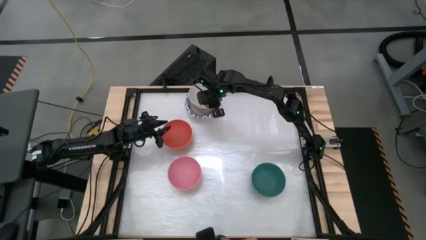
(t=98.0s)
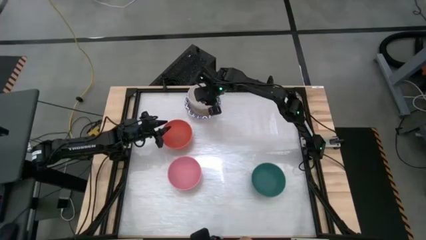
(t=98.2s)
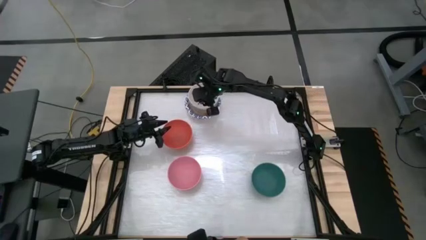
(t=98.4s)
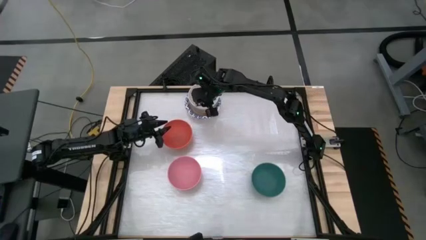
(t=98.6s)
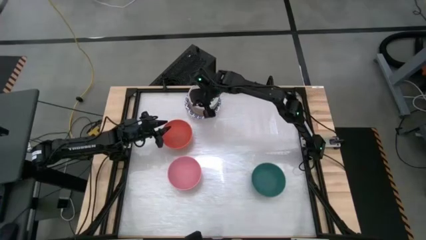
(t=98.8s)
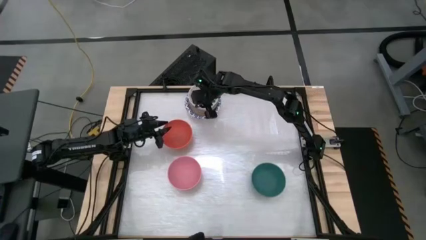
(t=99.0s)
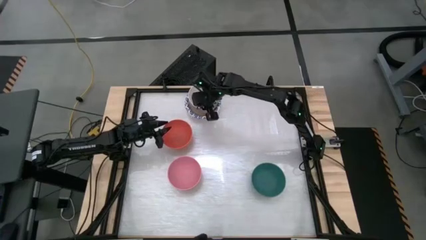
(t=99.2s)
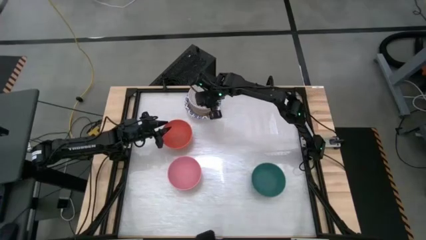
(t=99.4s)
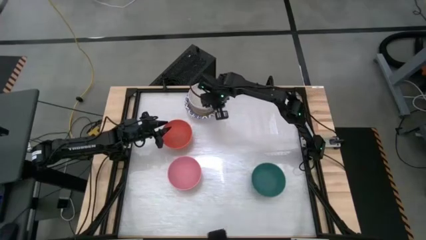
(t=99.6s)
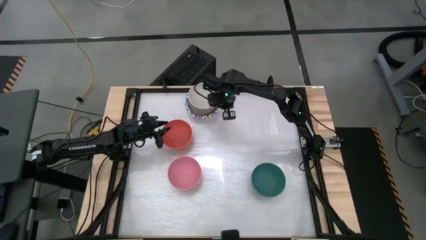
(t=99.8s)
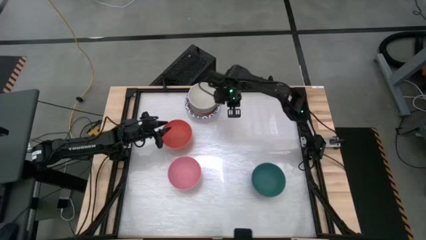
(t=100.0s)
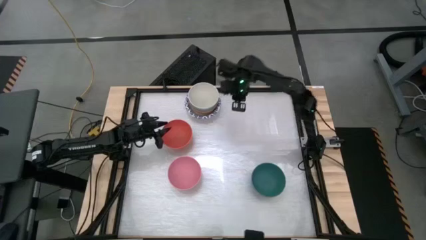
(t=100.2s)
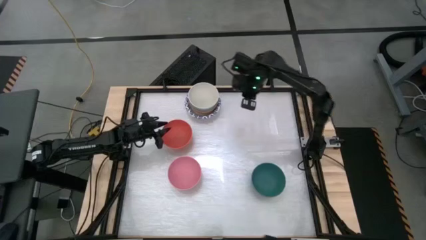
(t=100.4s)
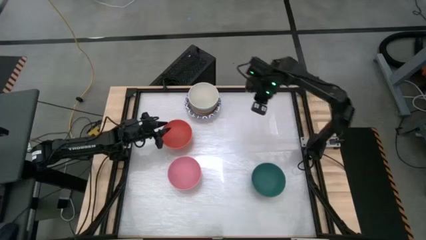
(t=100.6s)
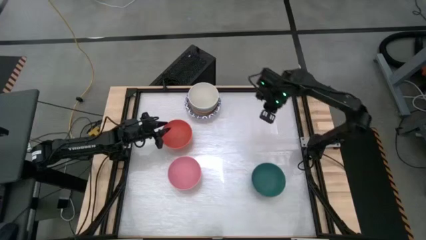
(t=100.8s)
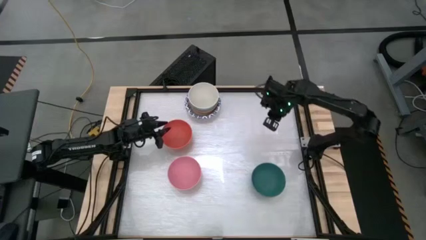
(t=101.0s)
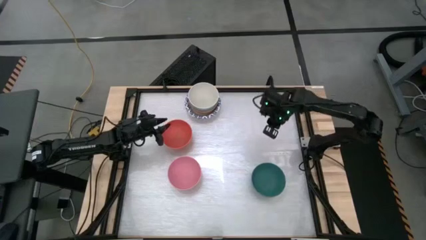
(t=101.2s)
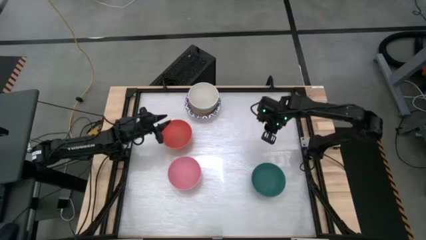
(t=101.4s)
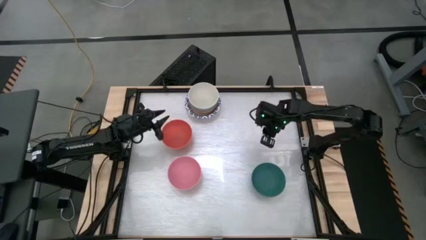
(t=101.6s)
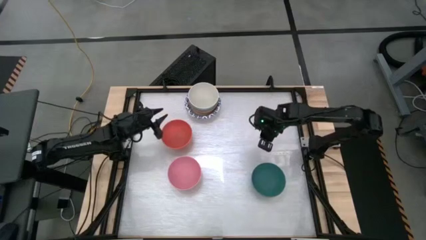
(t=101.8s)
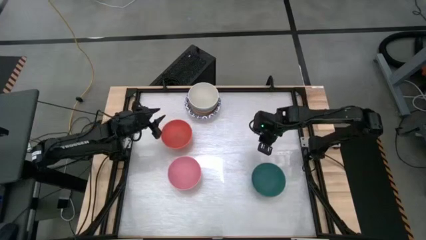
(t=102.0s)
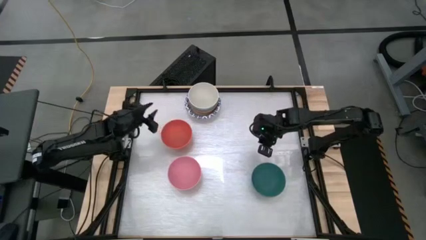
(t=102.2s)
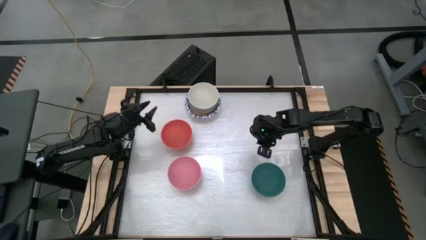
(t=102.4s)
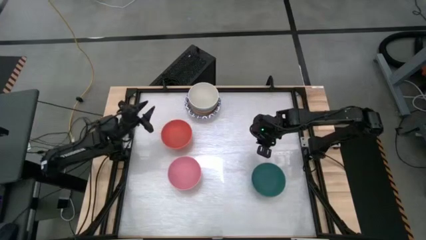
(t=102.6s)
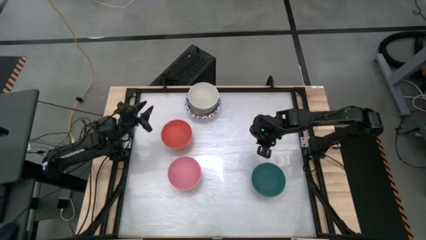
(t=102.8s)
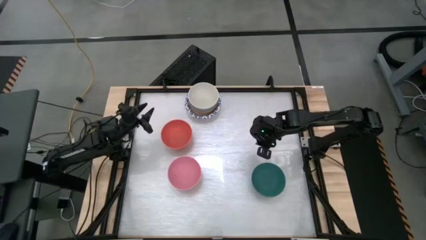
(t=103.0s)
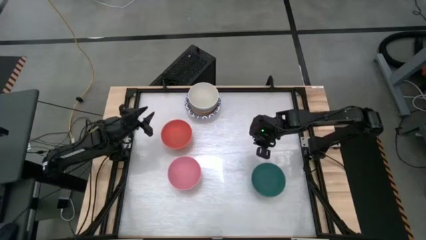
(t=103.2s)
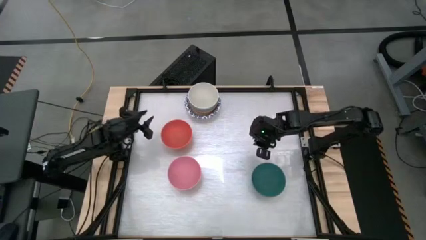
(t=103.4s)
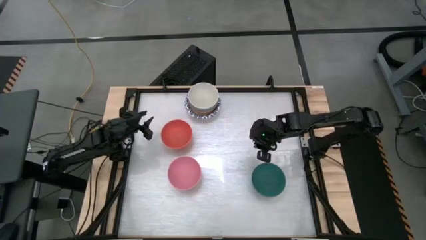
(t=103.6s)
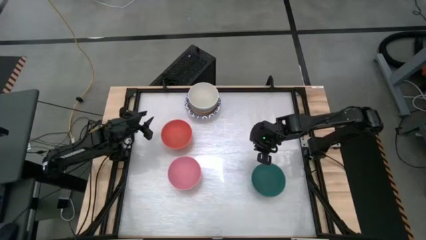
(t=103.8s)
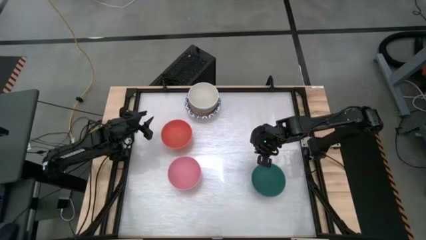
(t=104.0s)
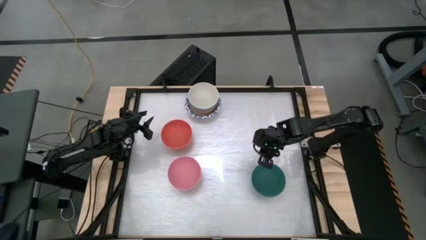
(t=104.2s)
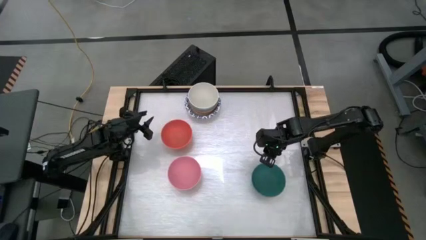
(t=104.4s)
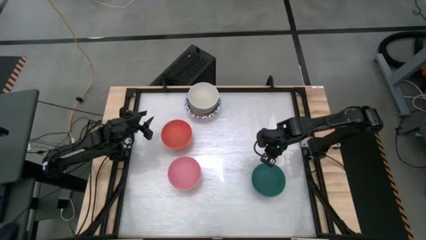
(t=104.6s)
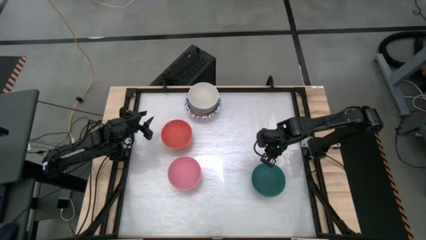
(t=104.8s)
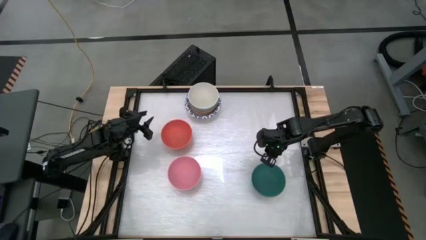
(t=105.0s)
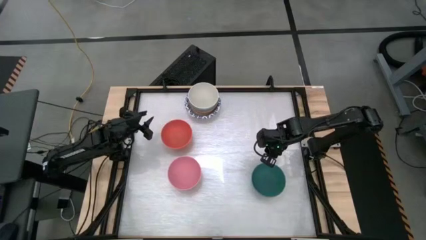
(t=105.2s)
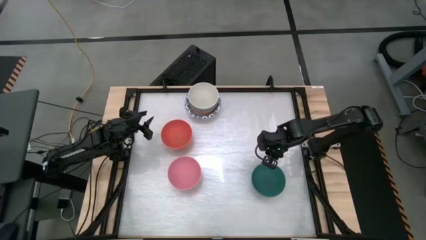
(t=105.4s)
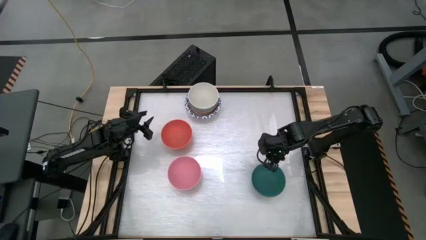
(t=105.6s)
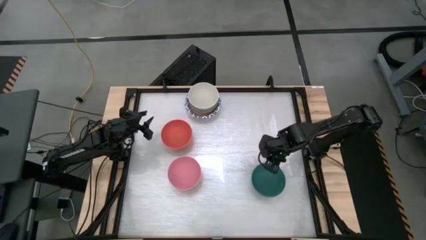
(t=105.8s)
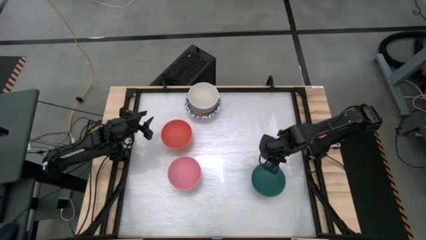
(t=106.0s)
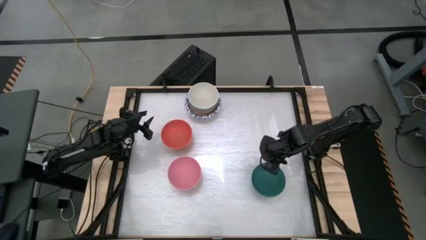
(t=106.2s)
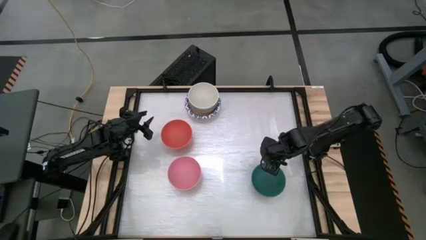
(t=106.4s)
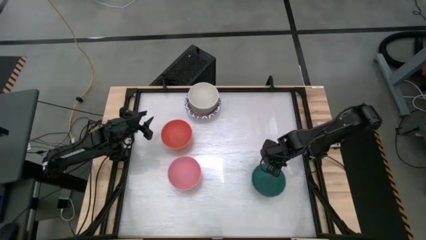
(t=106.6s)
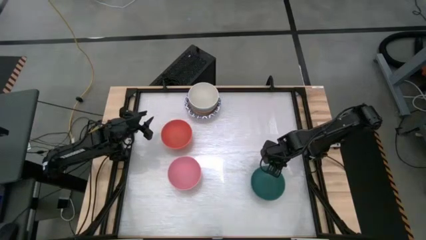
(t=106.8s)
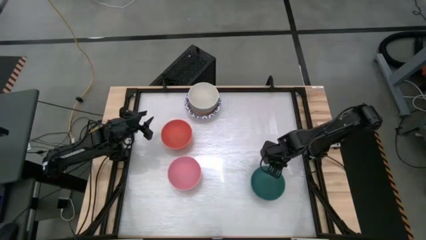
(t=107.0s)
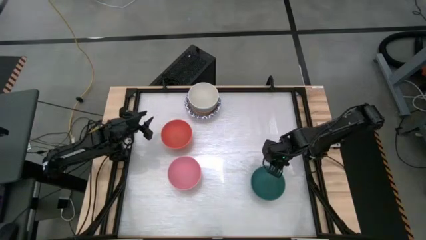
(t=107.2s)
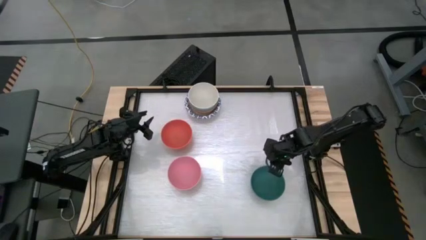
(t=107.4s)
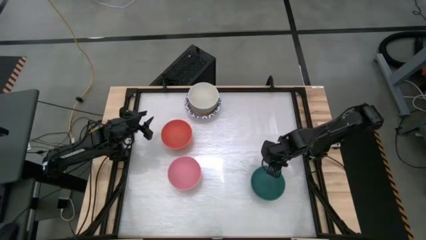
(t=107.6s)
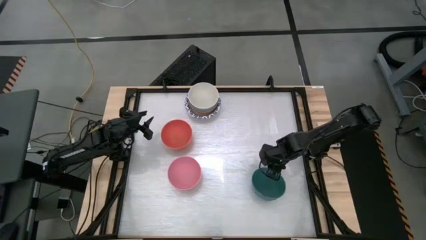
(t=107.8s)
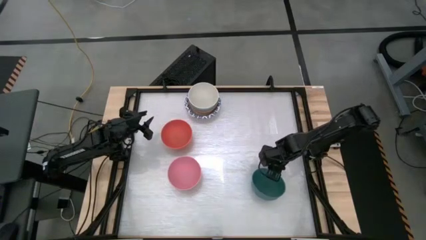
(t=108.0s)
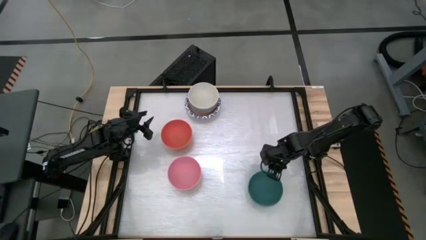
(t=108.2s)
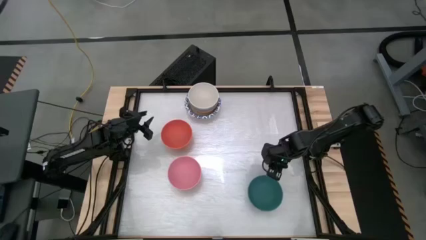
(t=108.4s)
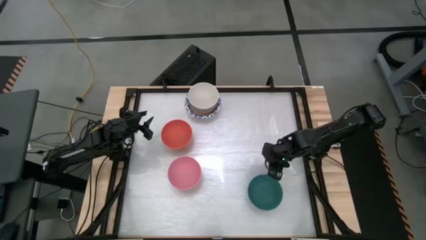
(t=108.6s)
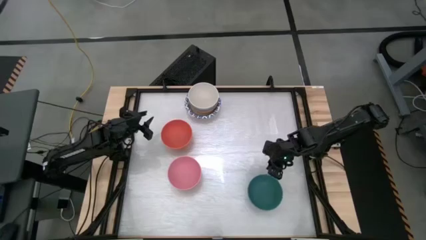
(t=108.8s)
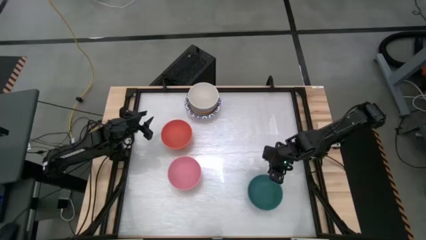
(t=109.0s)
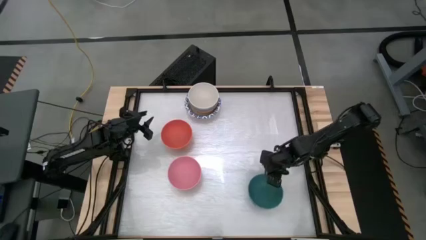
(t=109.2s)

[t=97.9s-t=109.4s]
Stack the green bowl onto the stack of bowls
